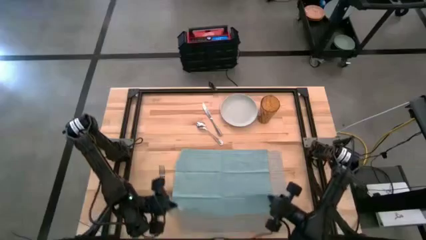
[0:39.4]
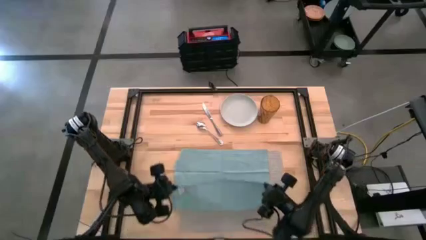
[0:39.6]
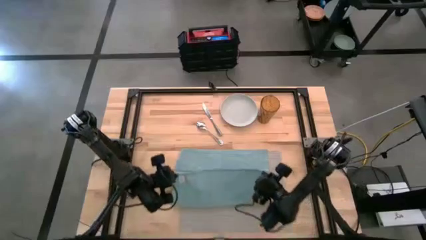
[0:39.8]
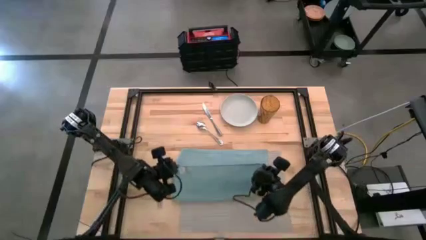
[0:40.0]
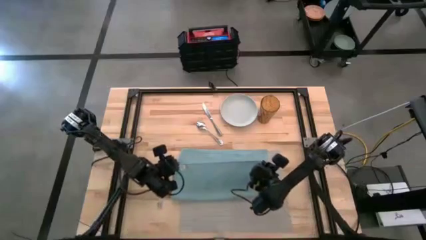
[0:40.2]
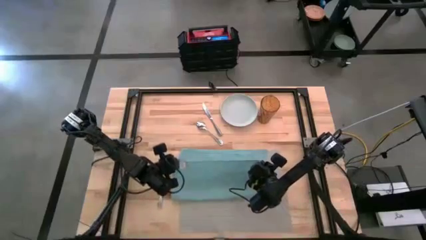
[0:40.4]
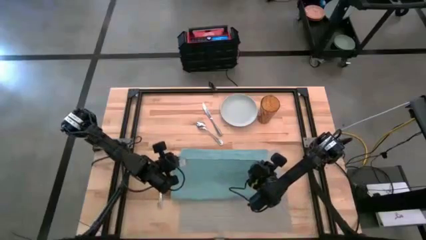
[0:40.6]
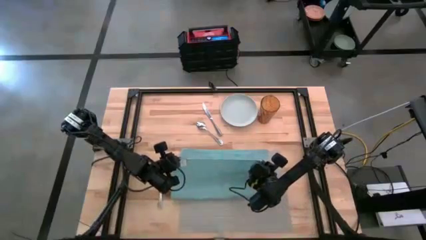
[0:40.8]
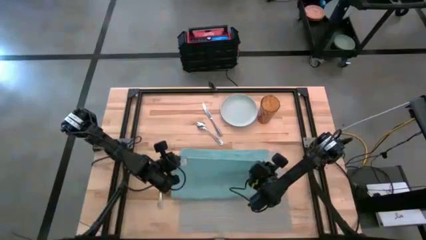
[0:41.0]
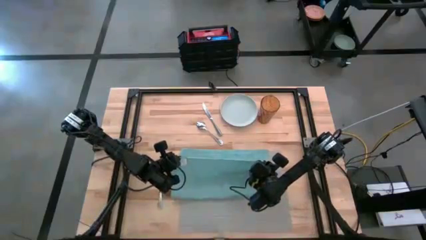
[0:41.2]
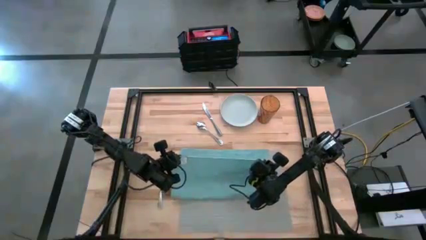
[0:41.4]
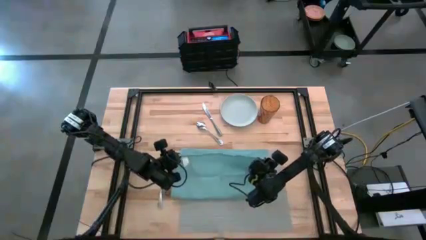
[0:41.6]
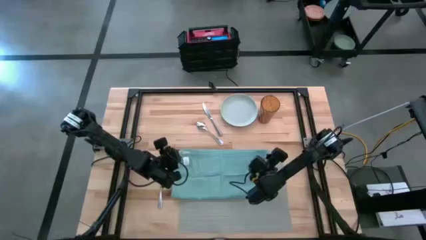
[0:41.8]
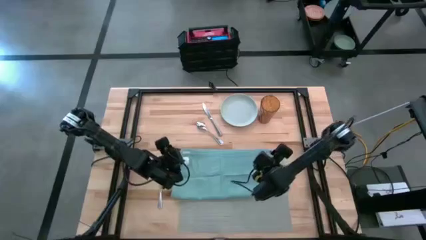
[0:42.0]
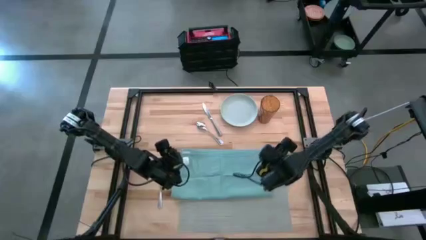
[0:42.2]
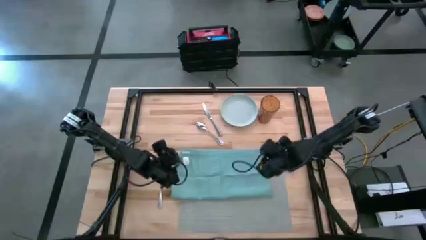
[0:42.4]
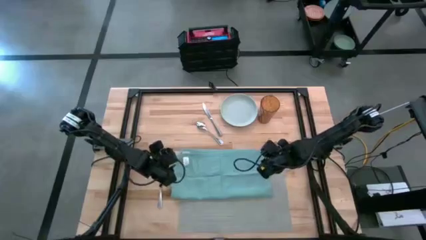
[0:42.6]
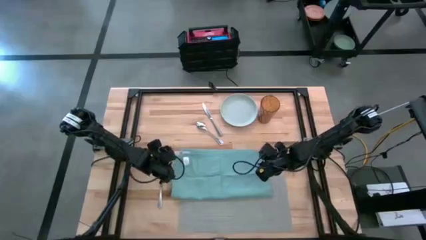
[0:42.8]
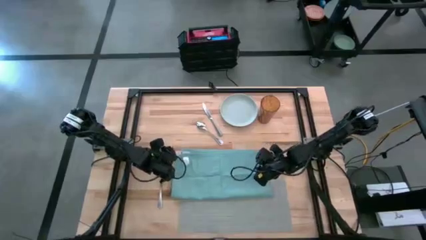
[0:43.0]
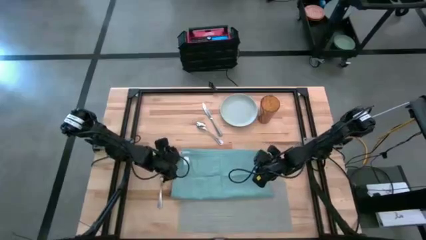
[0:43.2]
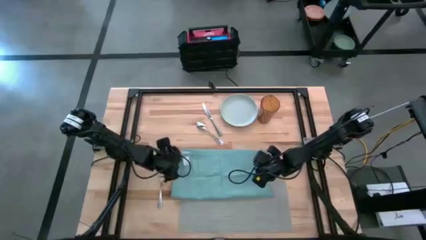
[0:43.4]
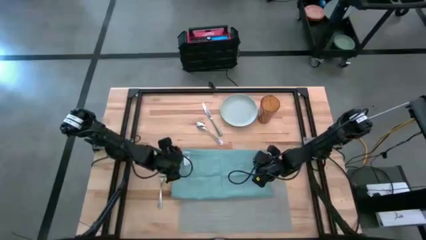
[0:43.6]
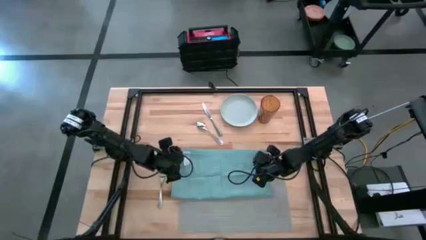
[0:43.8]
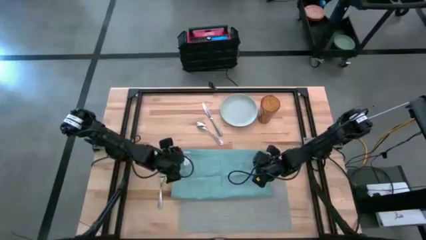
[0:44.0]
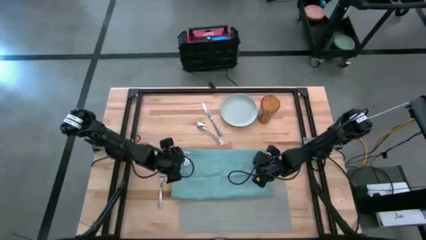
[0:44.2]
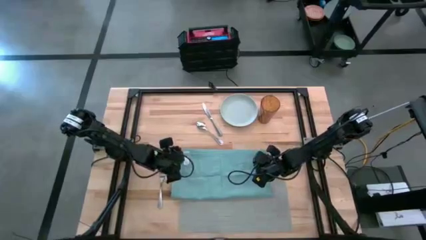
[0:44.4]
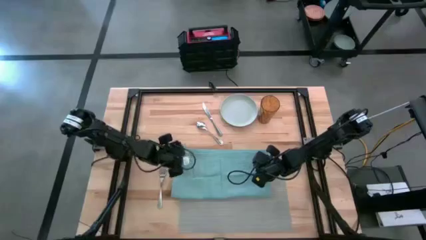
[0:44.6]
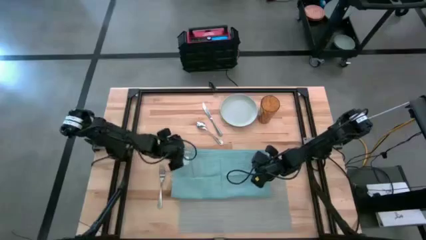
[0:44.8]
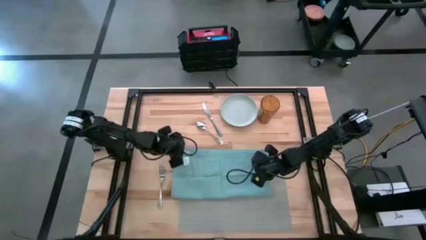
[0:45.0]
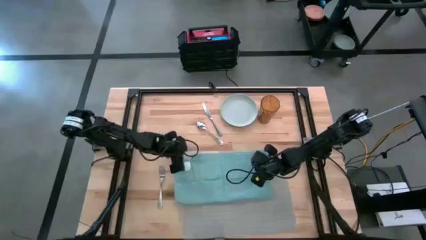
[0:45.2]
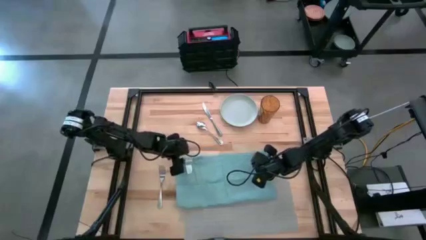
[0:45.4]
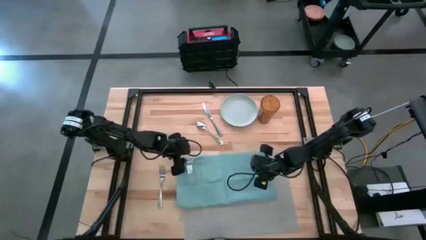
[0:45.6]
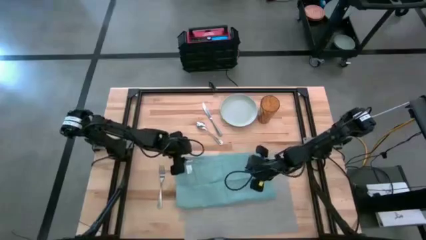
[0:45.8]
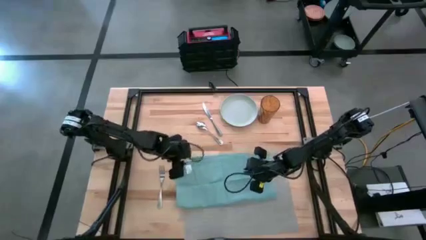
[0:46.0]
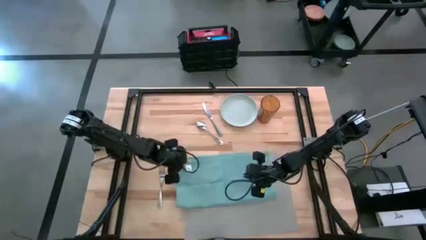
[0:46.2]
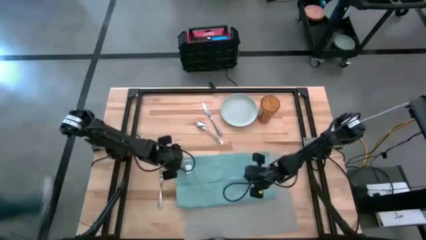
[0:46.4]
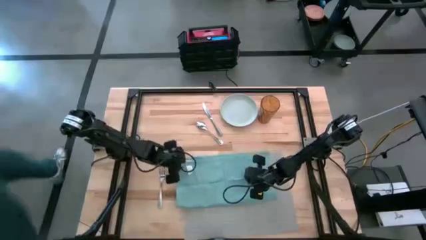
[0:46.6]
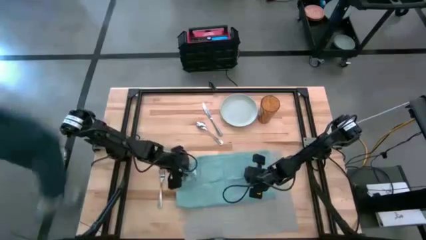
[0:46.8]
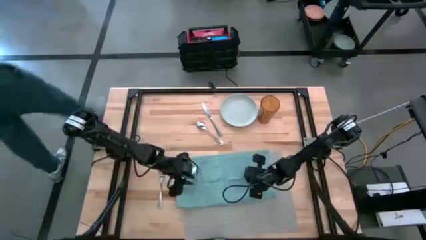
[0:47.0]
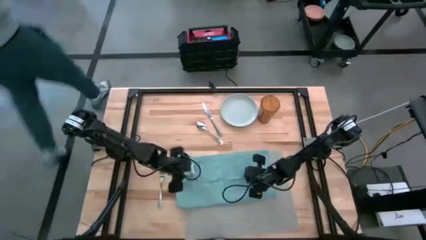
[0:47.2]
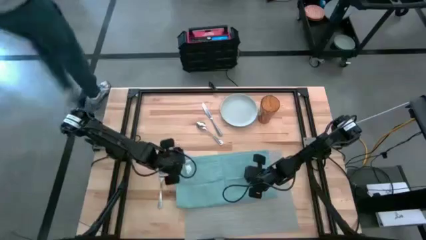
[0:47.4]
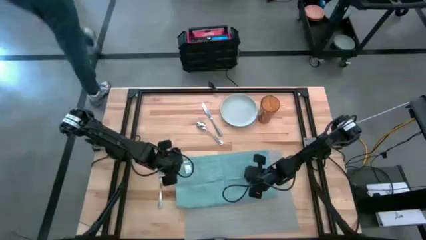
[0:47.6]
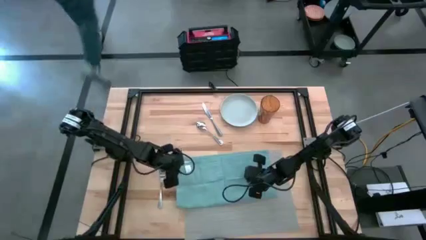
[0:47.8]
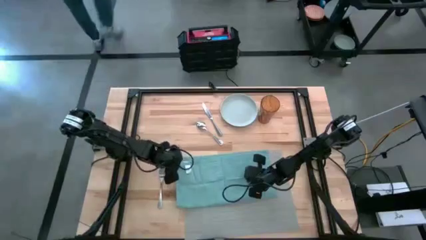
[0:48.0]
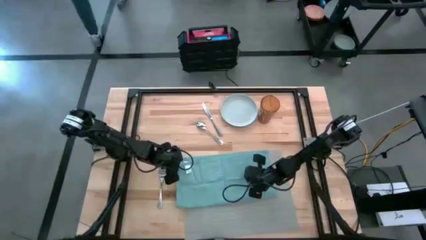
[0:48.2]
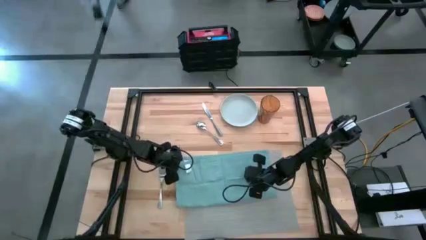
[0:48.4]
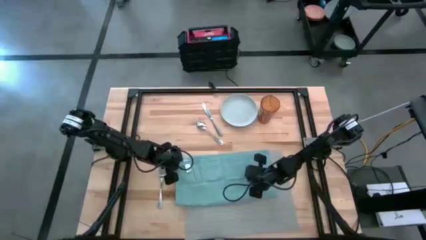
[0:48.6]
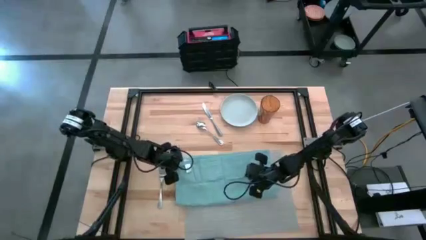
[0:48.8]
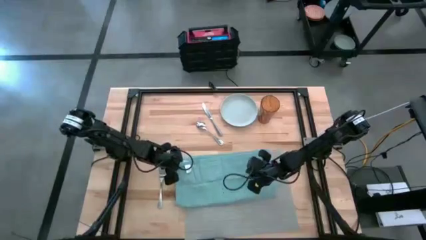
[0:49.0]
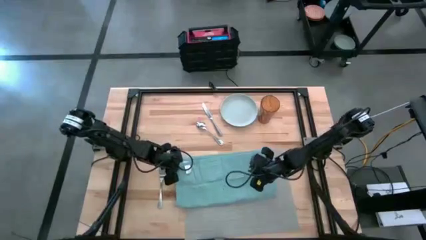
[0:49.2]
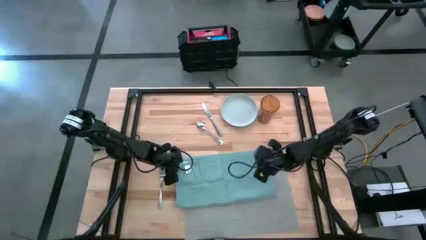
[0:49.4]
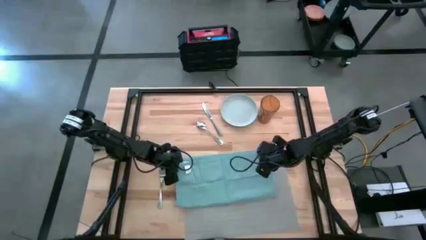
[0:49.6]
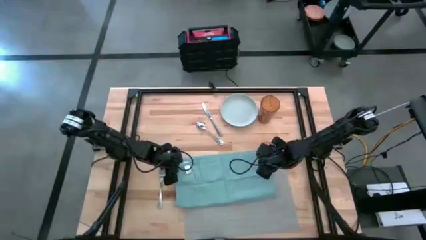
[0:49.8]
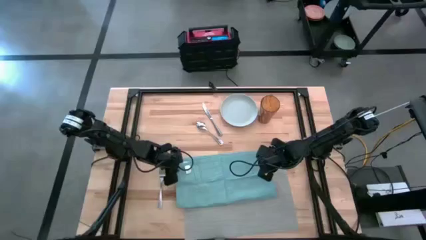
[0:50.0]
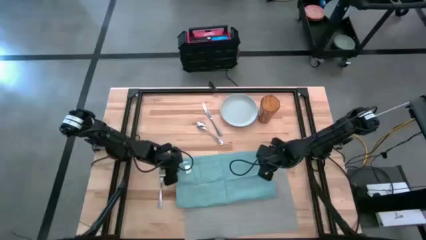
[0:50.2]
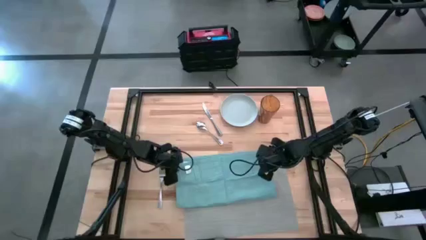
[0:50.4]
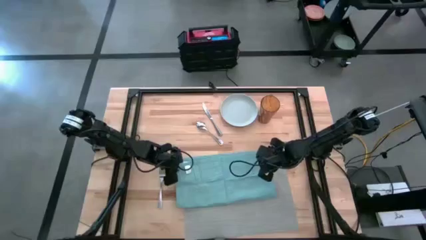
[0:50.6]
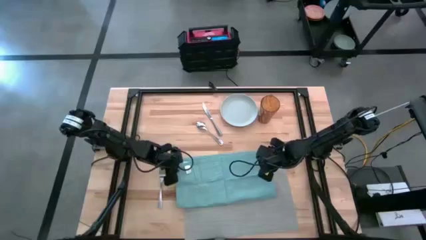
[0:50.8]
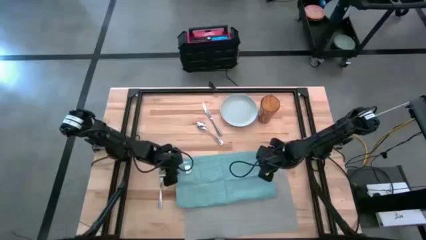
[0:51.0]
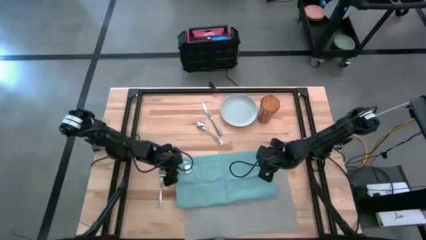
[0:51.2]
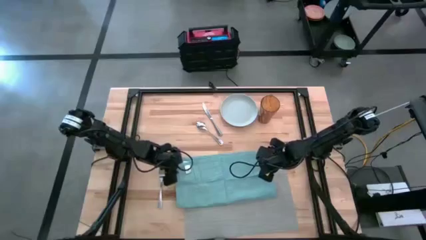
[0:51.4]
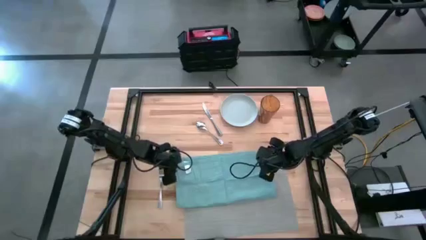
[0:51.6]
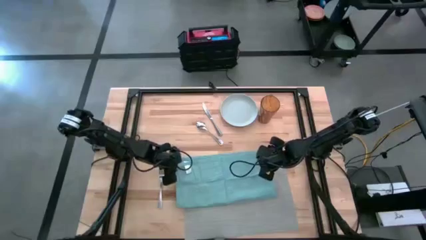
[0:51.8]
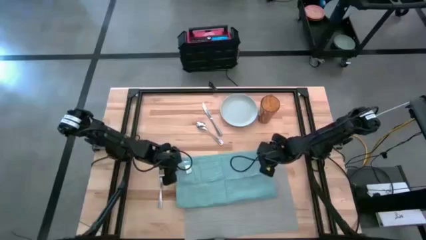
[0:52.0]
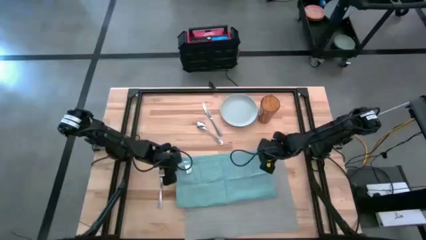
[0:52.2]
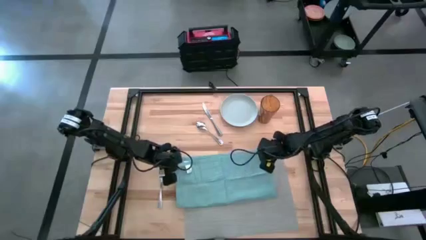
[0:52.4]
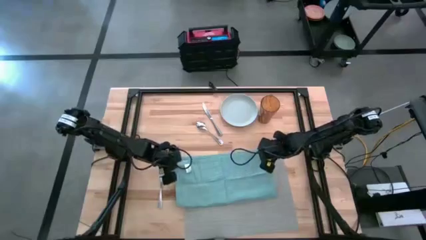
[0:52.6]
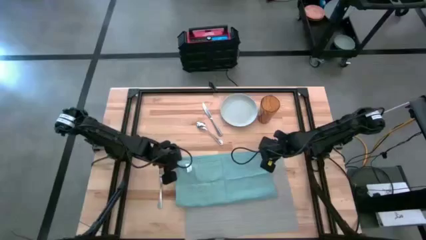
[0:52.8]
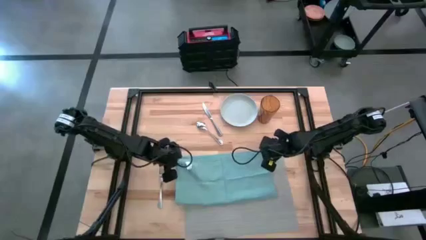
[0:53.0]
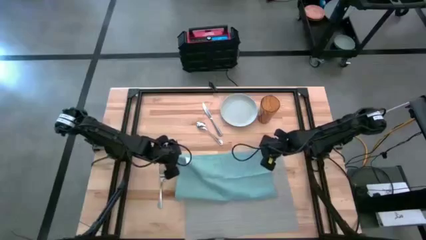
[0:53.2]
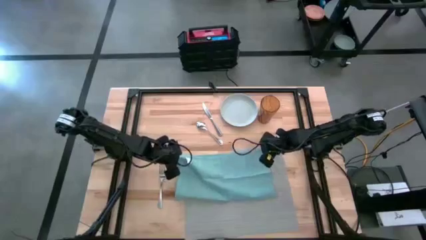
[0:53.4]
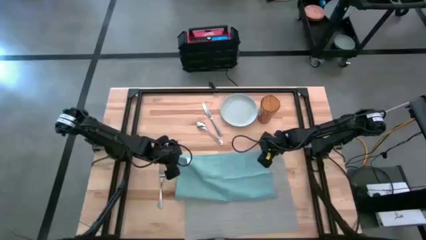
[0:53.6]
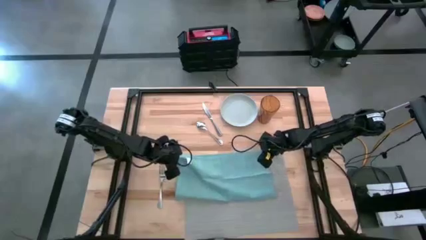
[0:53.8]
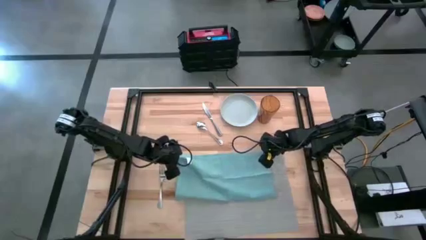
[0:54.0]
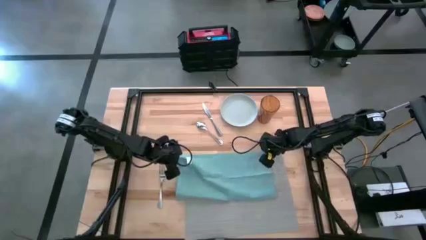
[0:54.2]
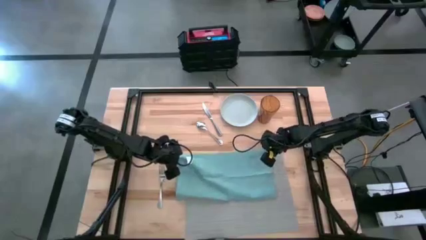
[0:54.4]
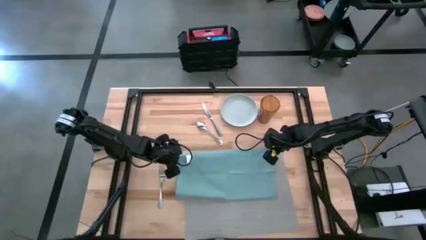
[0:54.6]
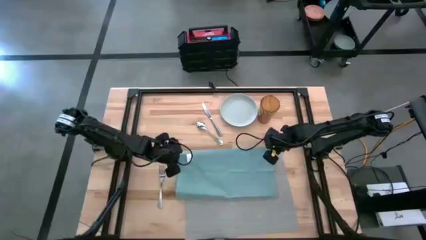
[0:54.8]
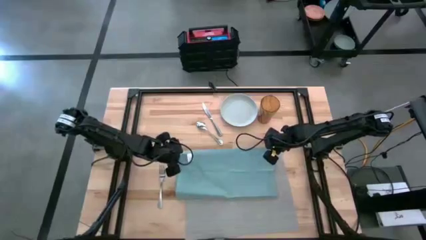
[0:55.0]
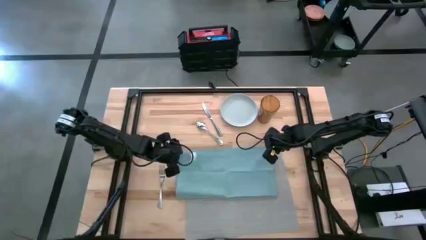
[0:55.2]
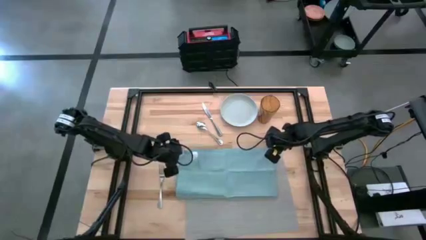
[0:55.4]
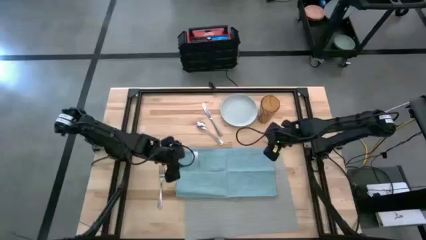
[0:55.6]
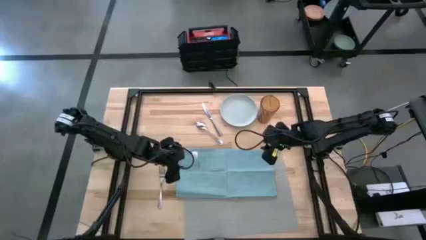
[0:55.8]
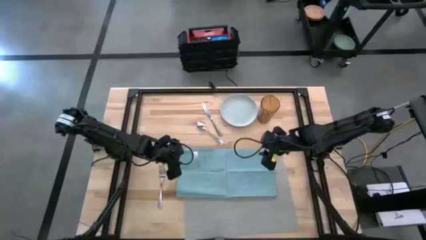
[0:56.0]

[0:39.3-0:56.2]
Task: Set table place
Fold the blue napkin on the gray placemat
